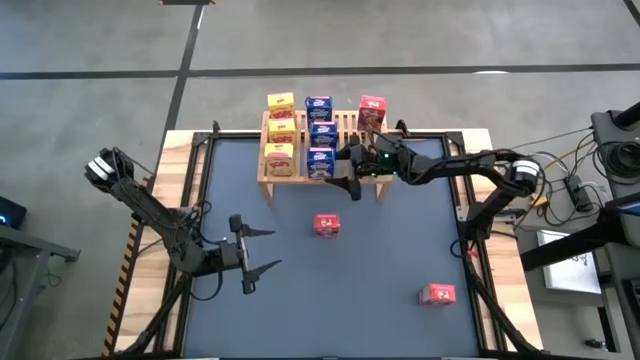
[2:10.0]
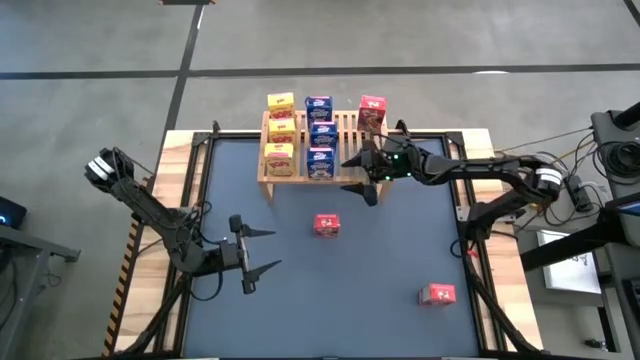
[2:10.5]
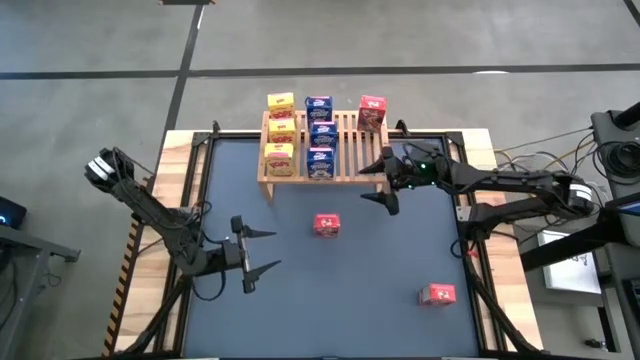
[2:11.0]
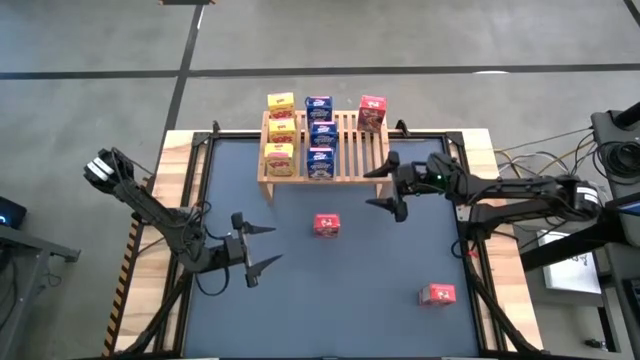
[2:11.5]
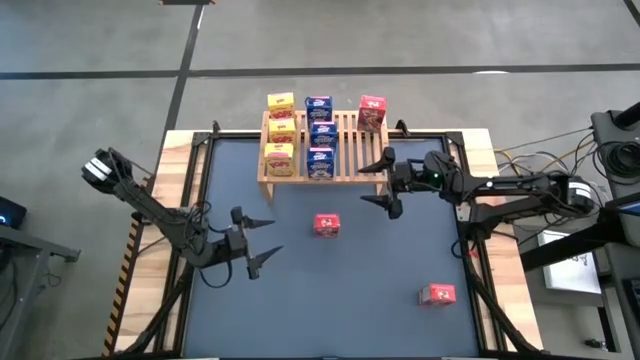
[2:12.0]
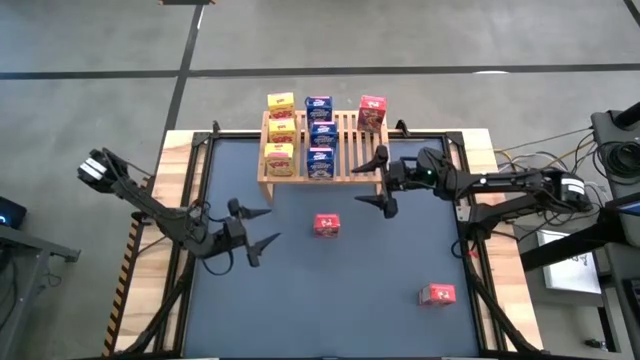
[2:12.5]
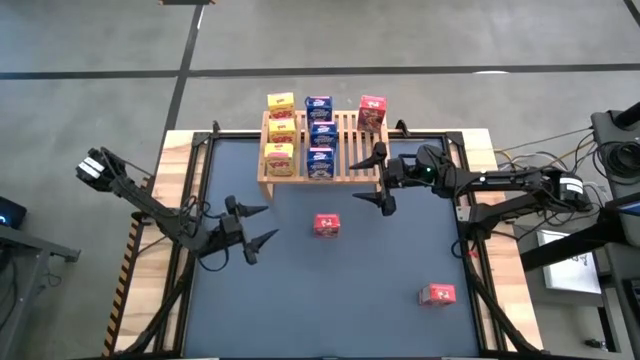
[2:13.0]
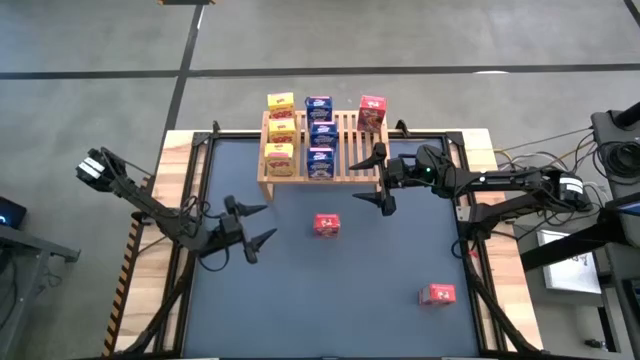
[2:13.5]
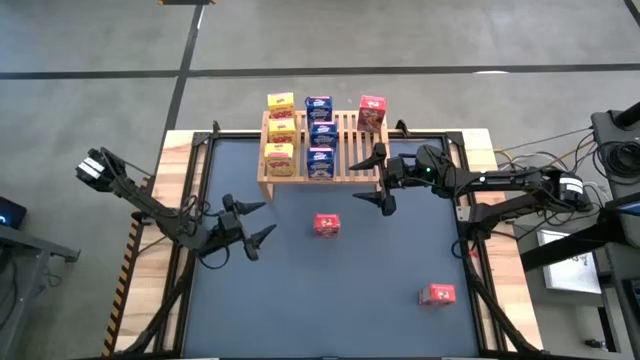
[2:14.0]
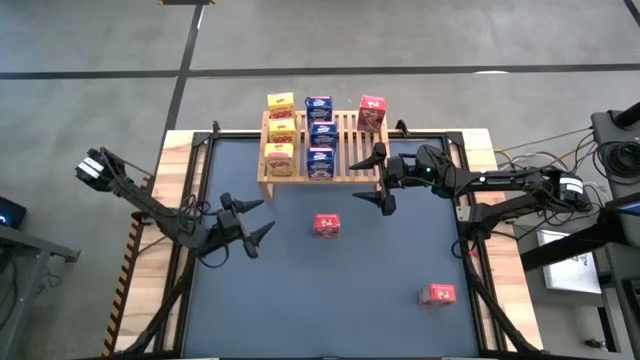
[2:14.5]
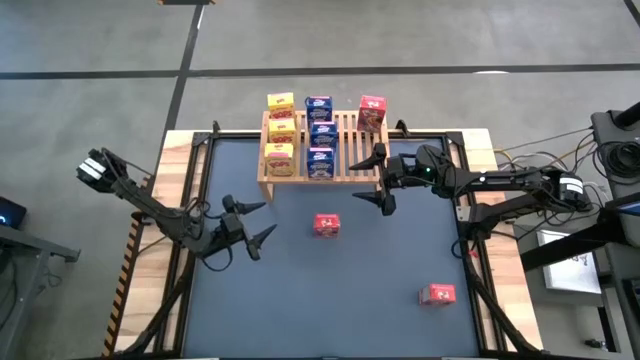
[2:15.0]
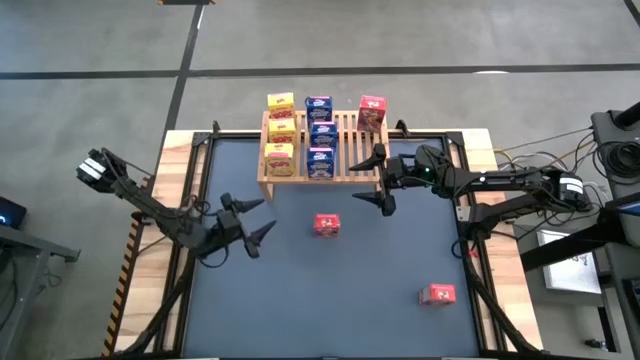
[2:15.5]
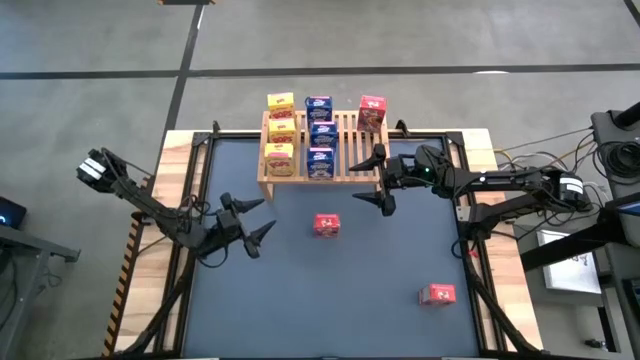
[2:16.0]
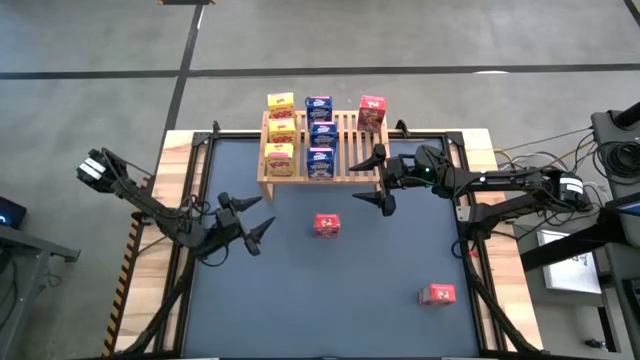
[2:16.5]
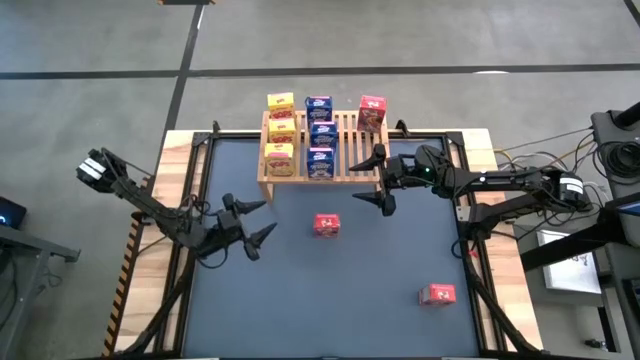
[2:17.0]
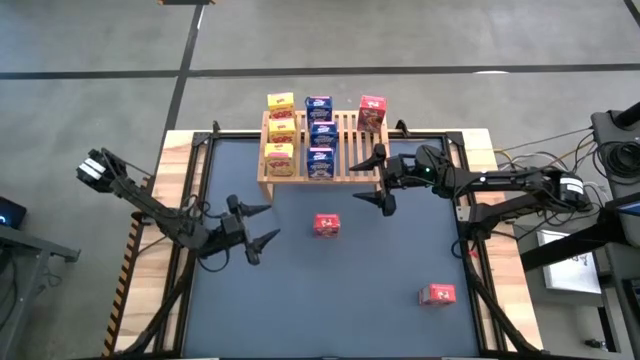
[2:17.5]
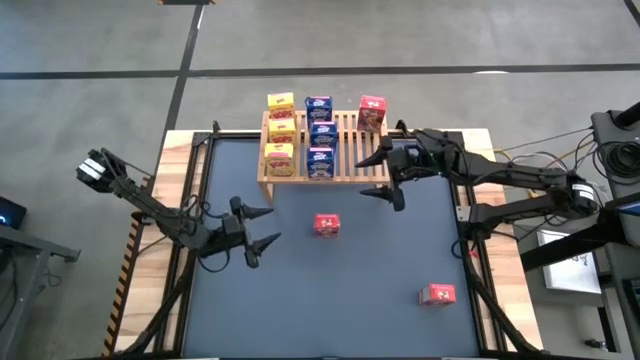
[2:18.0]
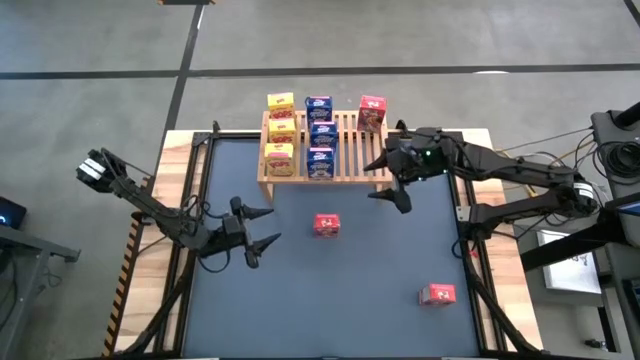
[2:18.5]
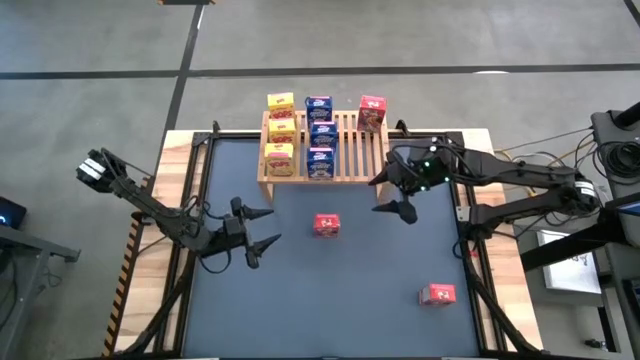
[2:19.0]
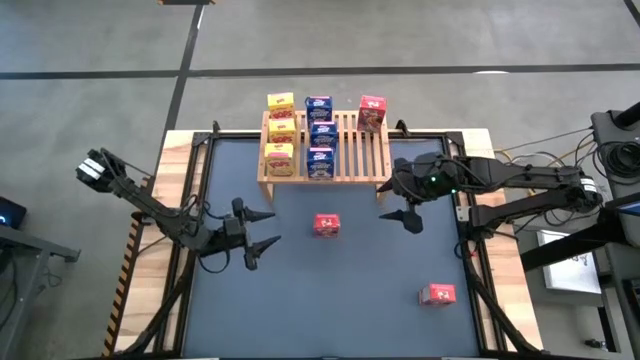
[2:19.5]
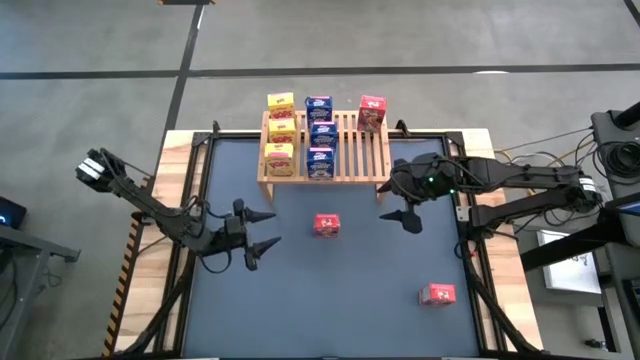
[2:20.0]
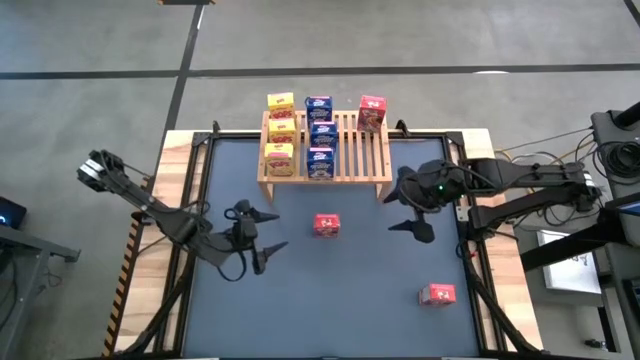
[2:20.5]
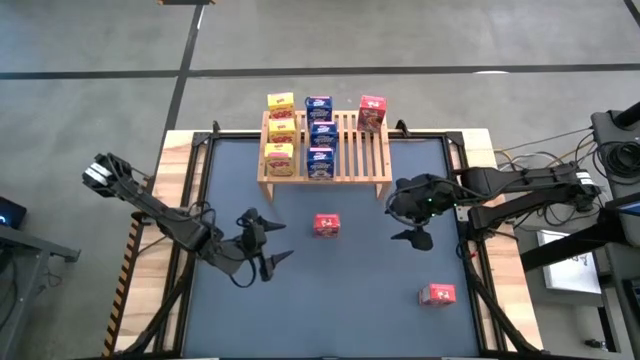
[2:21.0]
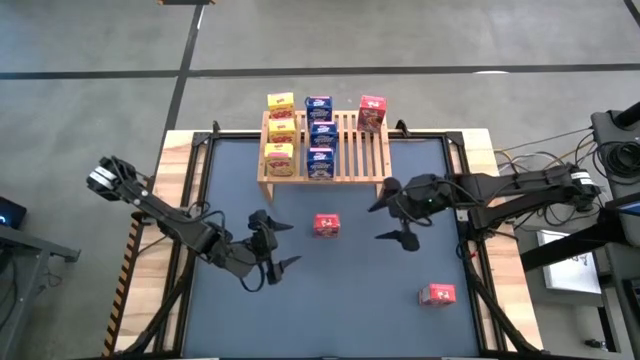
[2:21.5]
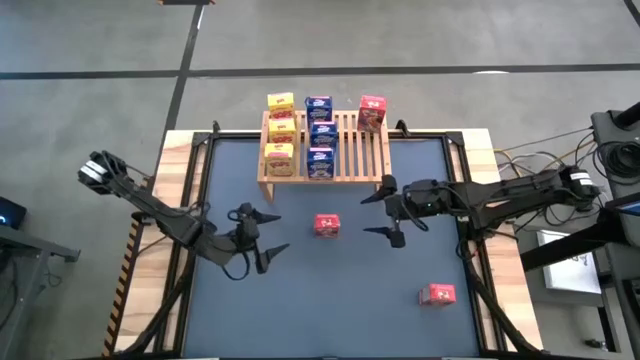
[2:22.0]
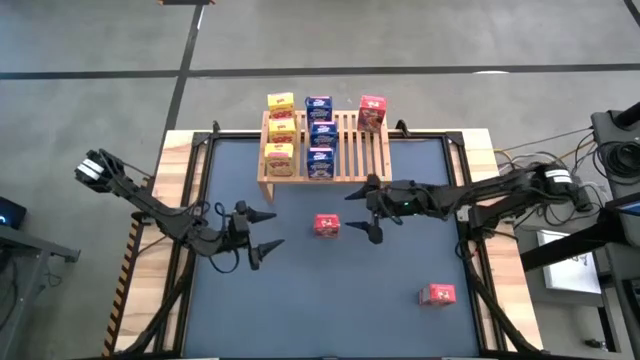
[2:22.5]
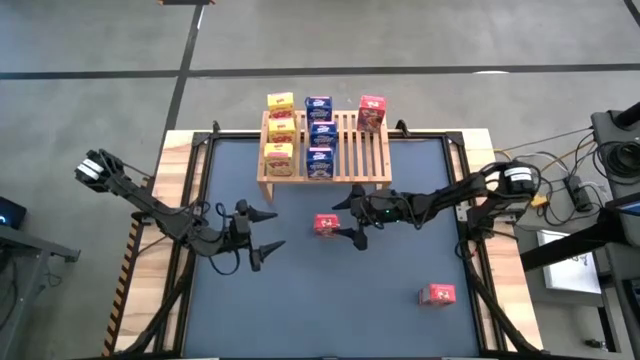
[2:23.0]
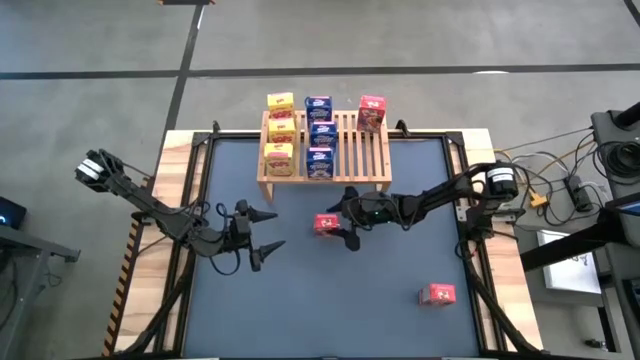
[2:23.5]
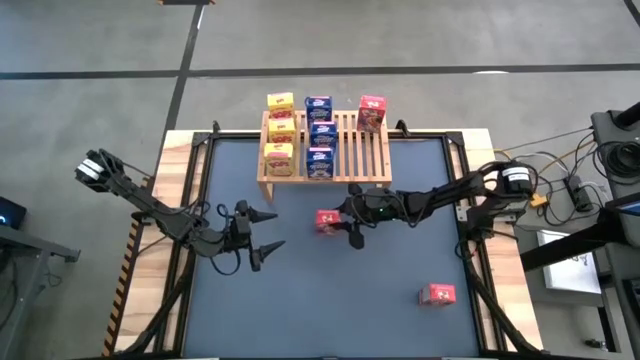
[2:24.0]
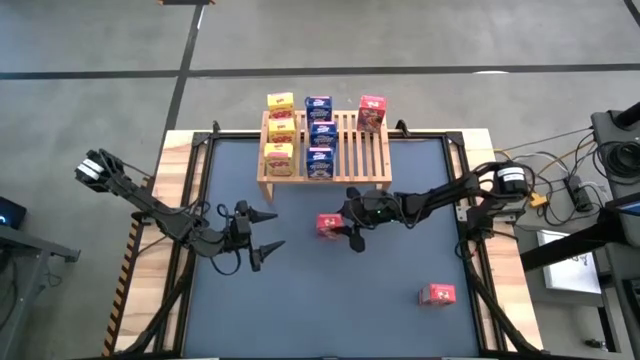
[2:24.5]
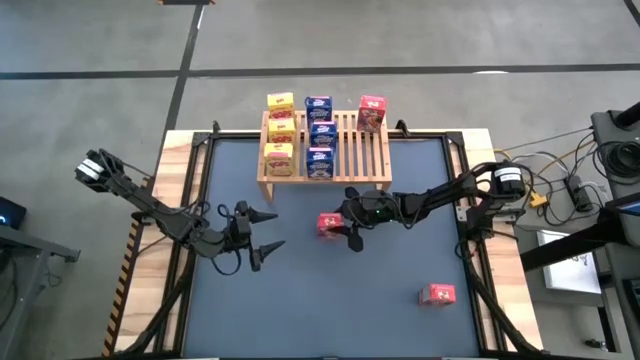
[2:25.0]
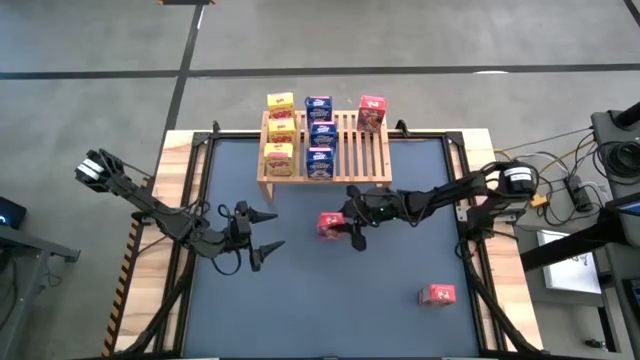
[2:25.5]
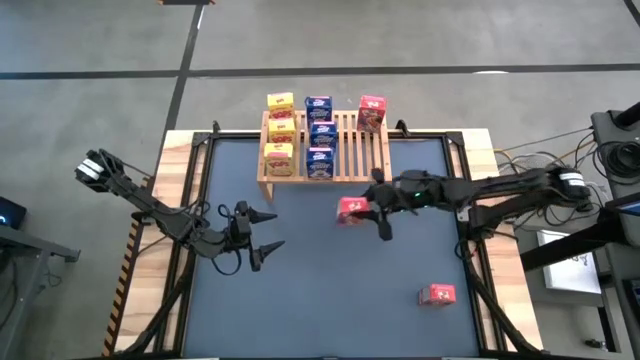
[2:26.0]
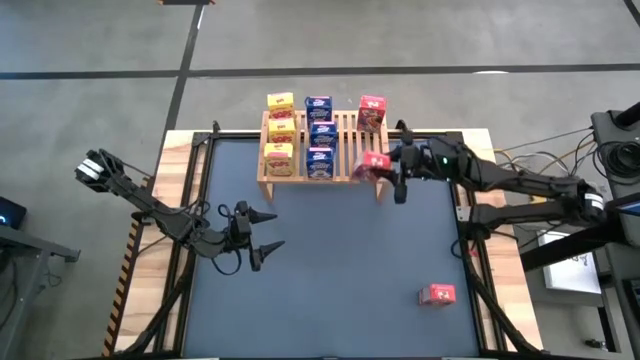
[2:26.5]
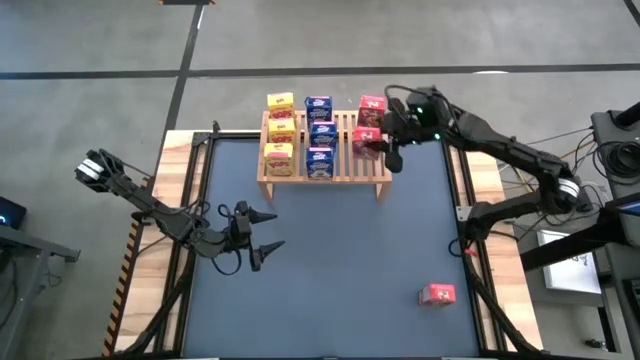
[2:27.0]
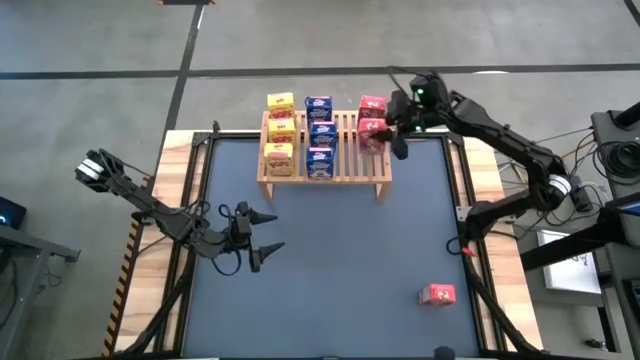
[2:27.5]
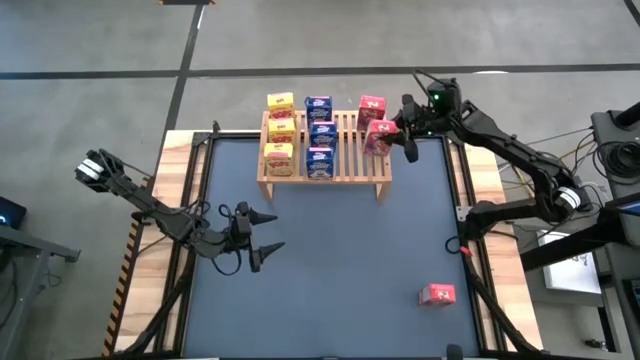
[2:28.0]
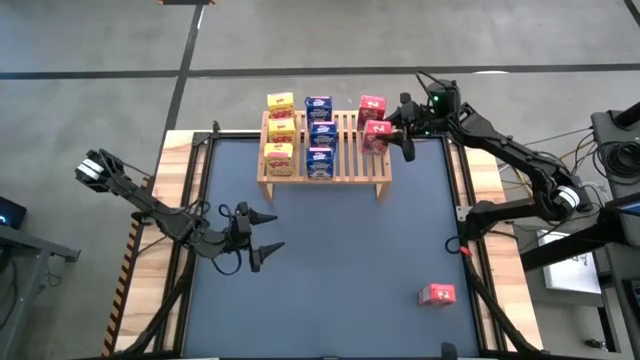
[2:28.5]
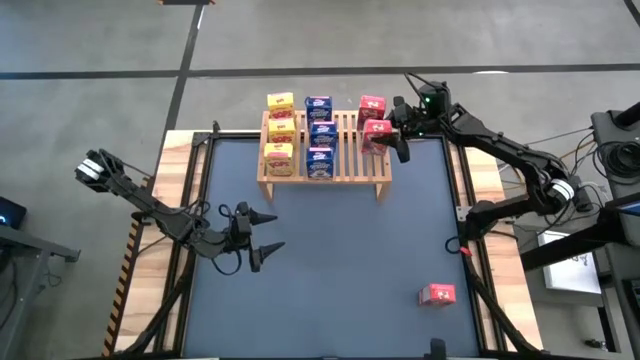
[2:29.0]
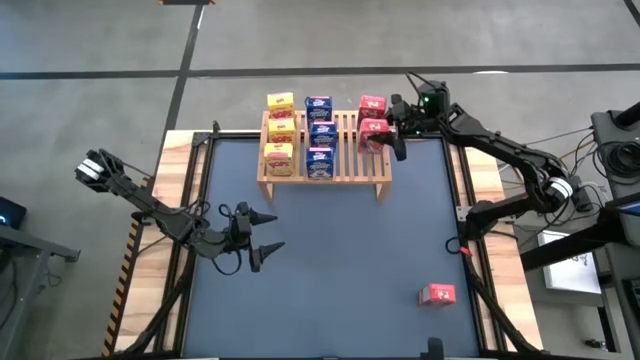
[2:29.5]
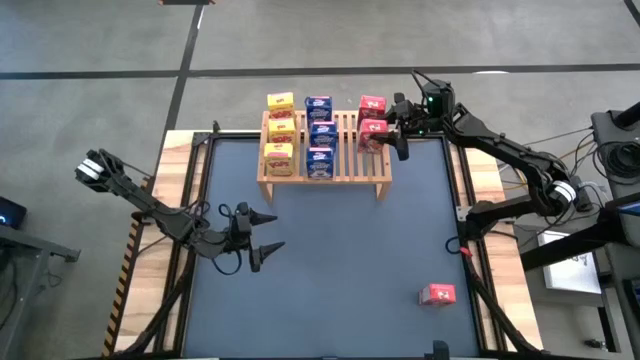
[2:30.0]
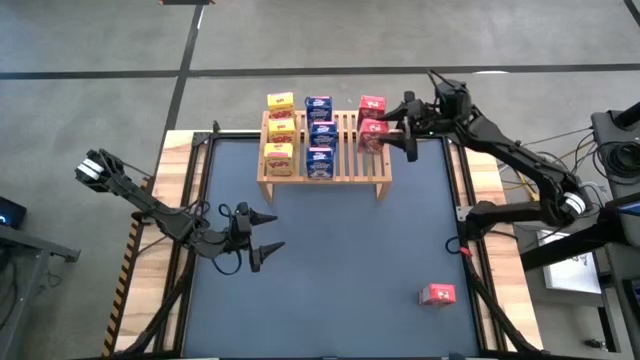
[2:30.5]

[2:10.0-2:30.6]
Task: Stack cereal on shelf
Put the top red cereal box on the shelf aligned with the other red cereal box
